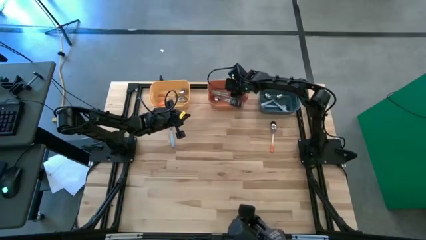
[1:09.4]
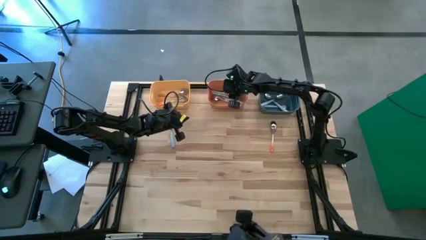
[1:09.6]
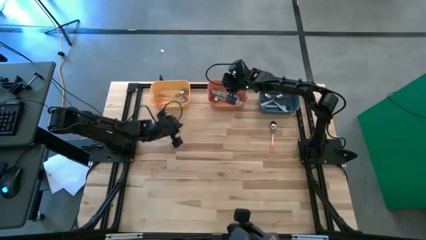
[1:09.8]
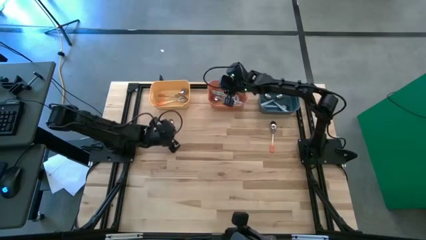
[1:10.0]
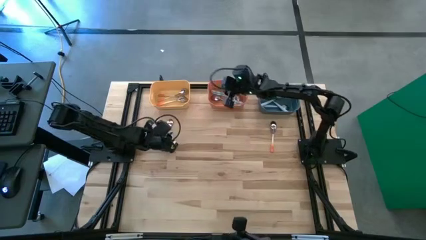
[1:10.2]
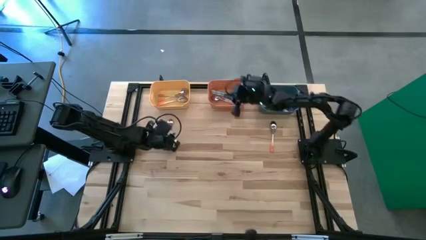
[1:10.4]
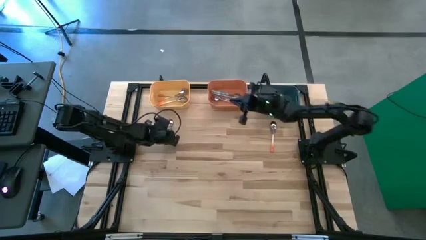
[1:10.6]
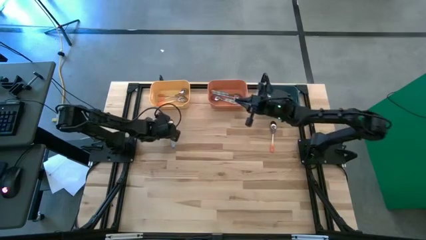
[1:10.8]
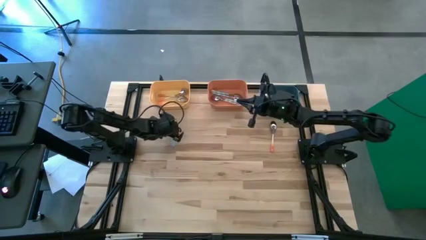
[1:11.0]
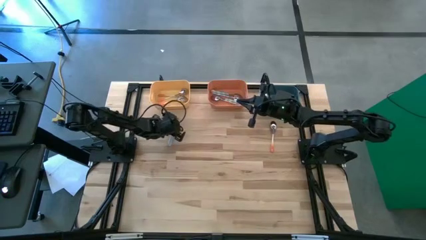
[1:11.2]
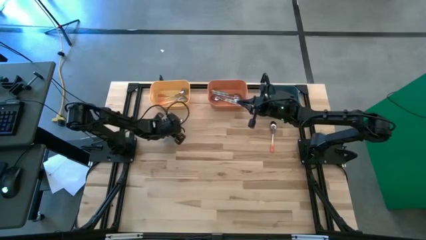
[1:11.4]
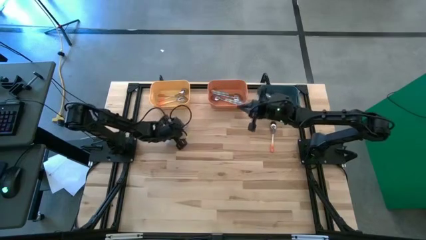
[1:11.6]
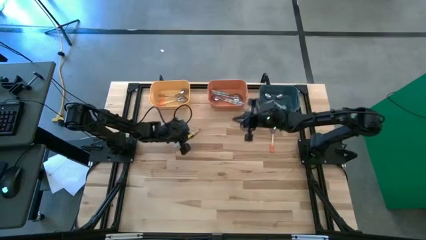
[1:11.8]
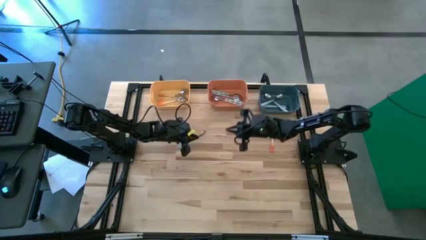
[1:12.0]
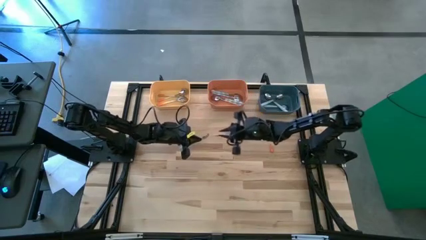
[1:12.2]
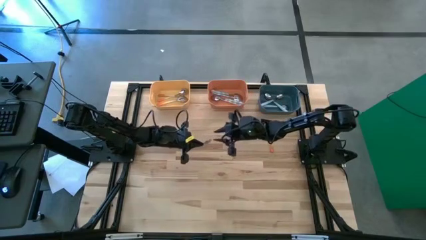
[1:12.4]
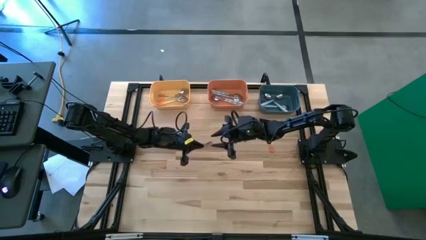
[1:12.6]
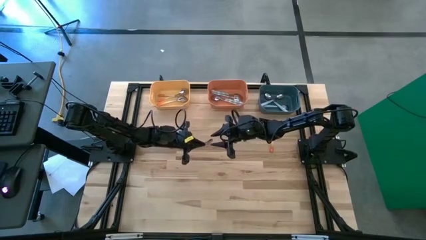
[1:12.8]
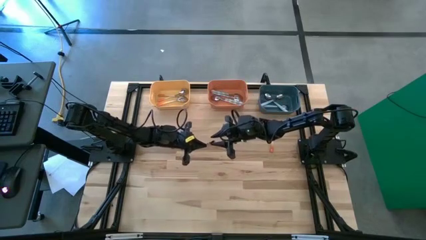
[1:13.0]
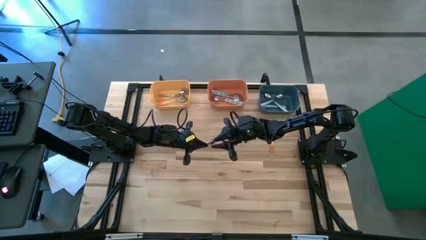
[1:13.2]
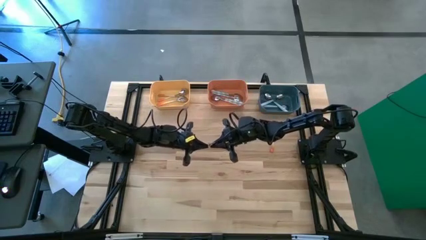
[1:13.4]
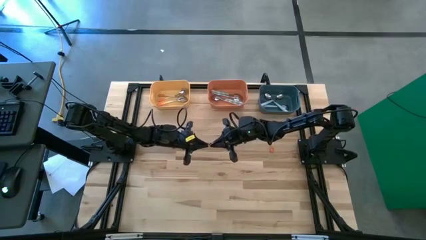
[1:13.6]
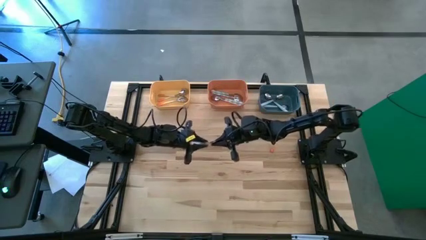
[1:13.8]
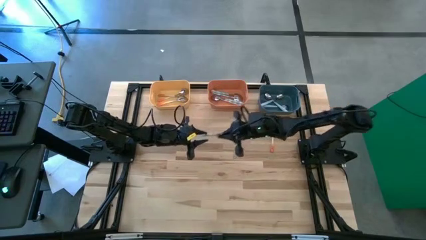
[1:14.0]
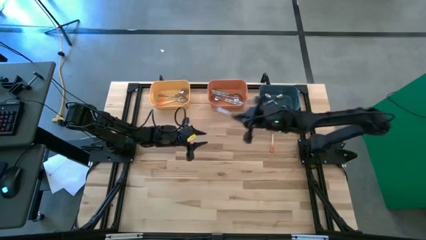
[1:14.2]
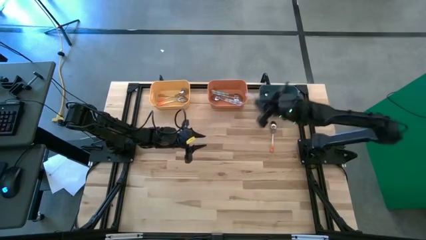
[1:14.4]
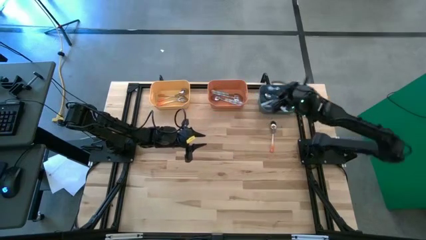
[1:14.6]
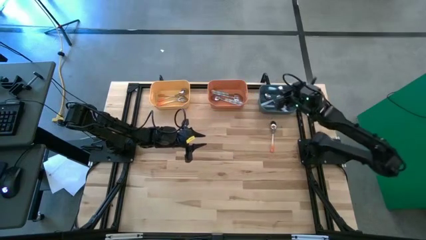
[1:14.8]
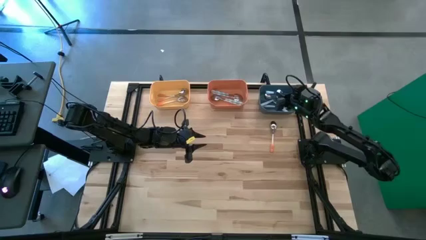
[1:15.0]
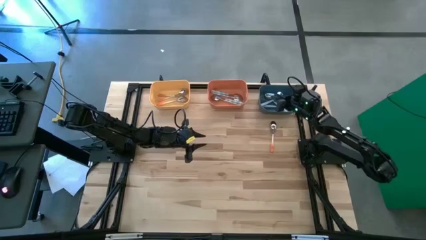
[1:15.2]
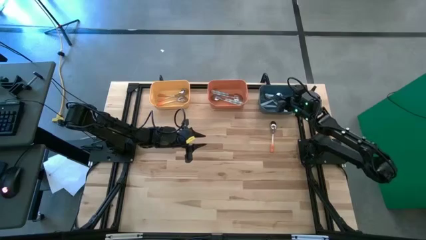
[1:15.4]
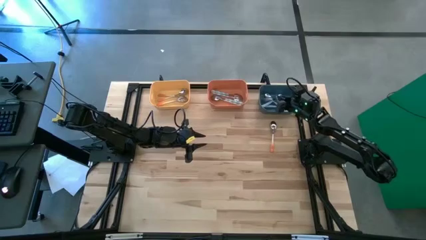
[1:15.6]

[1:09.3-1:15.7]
Task: Sort silverware by color (type)
Put the blue spoon into the blue bin

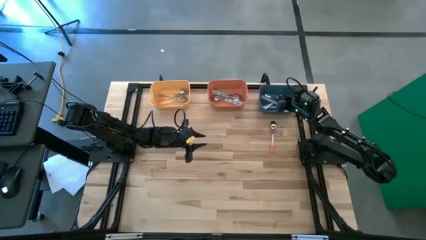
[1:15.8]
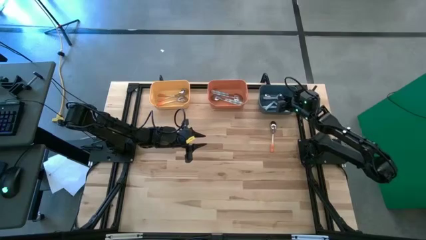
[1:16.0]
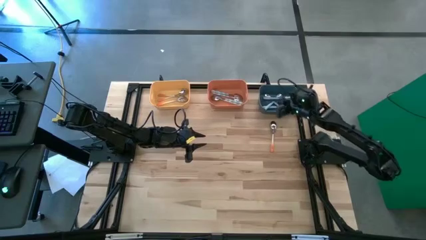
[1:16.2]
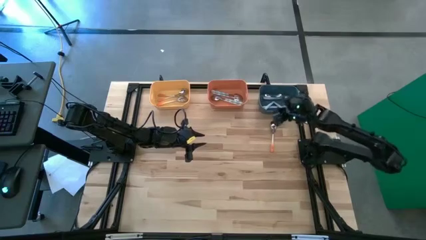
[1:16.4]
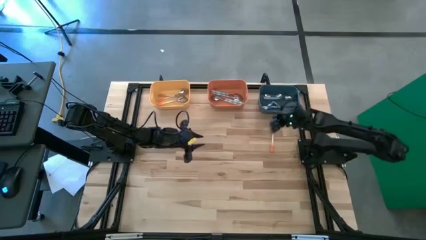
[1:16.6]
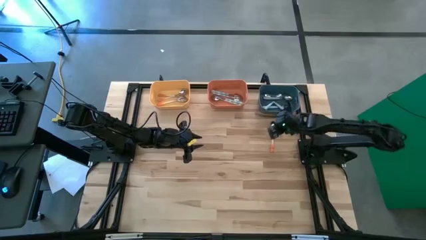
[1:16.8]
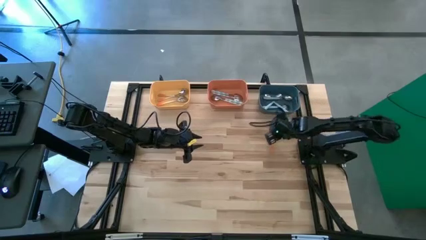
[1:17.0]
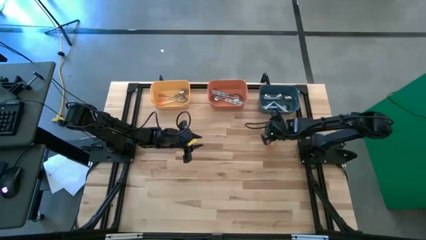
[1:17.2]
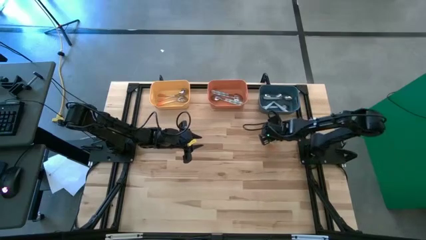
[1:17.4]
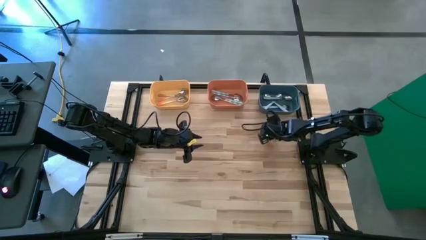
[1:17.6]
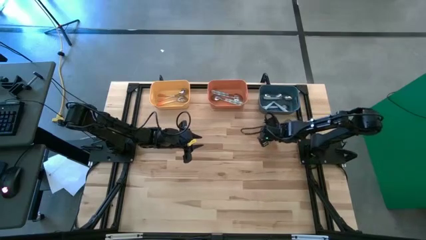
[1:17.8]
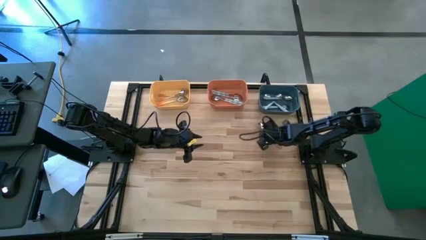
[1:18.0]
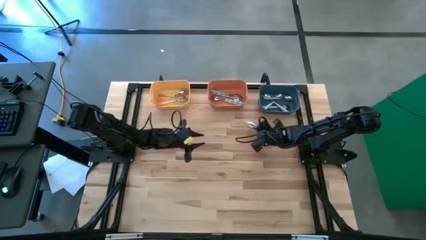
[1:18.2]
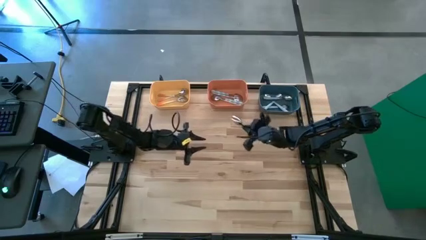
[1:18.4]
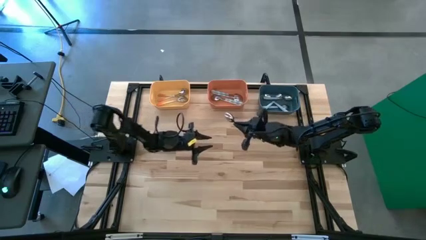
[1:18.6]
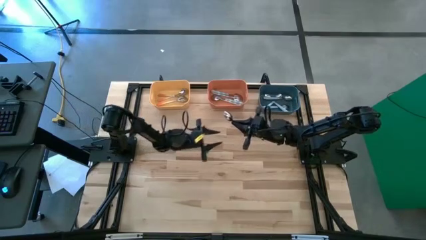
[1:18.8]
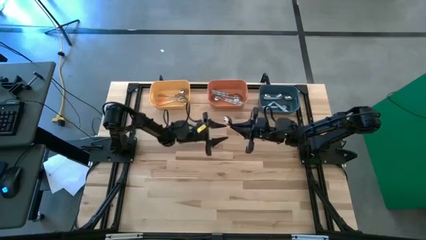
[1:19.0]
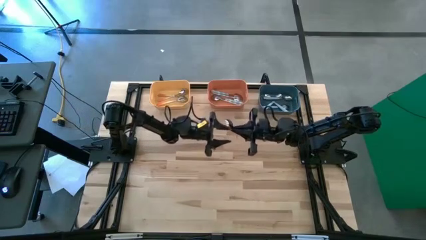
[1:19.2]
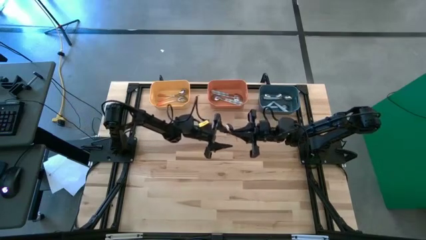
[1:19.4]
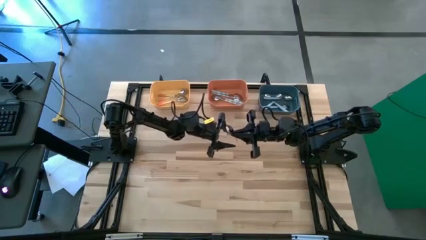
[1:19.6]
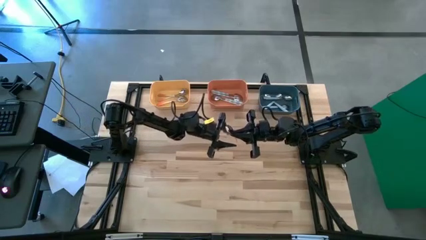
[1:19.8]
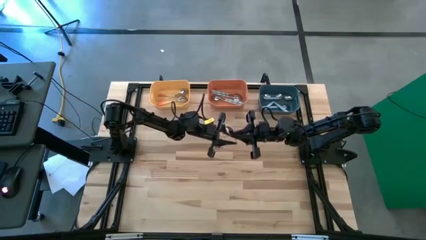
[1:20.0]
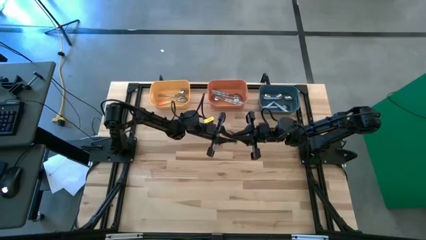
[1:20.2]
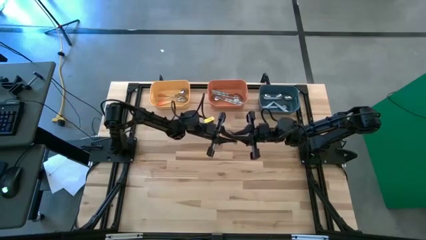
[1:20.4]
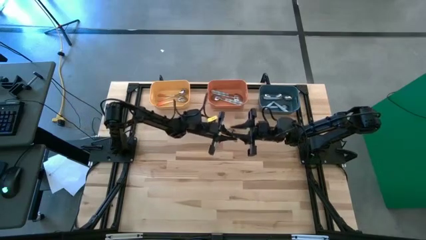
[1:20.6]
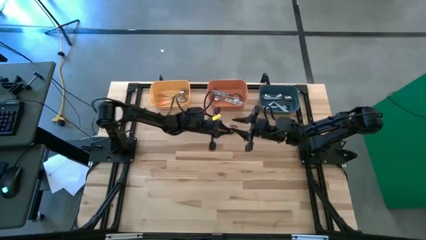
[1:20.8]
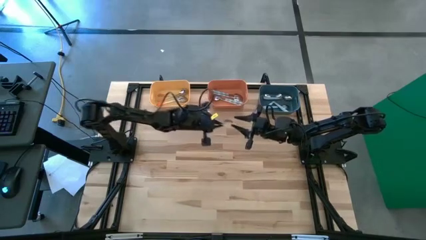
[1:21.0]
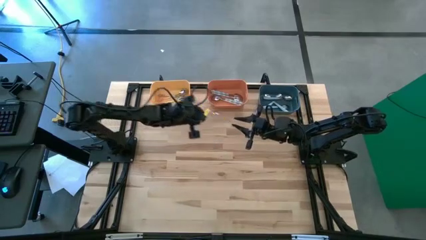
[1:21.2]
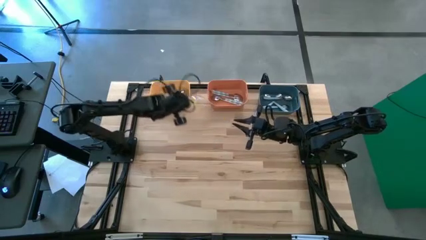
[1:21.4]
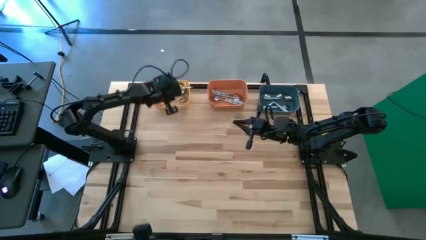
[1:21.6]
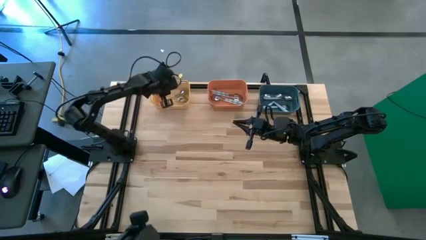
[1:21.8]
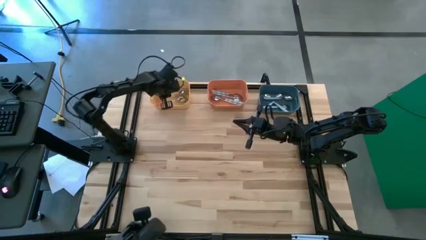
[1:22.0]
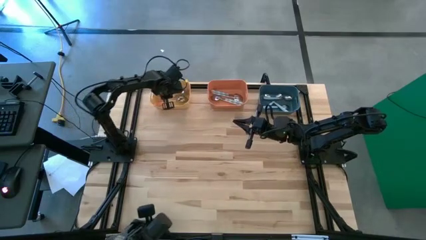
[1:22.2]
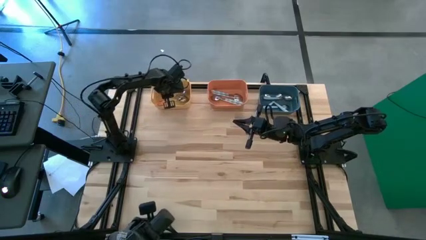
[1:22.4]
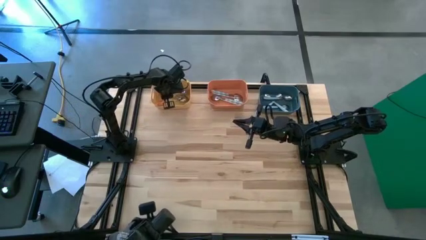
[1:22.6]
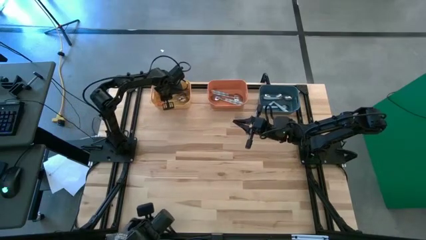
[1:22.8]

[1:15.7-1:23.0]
Put the orange spoon into yellow bin

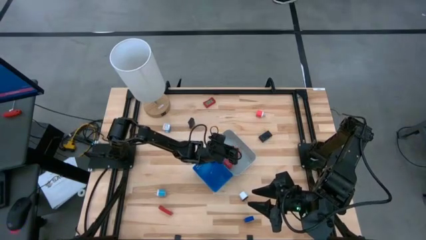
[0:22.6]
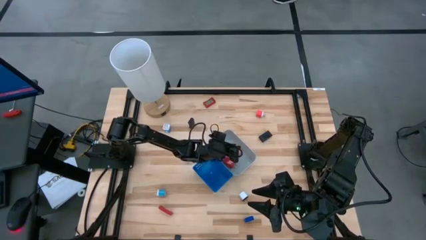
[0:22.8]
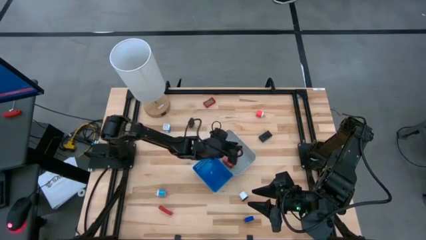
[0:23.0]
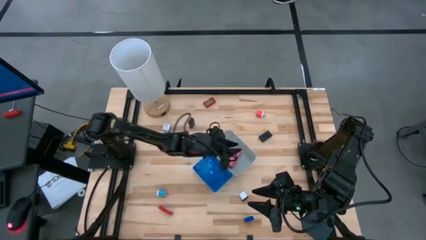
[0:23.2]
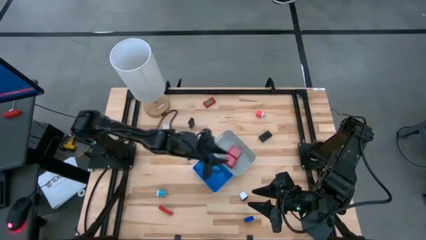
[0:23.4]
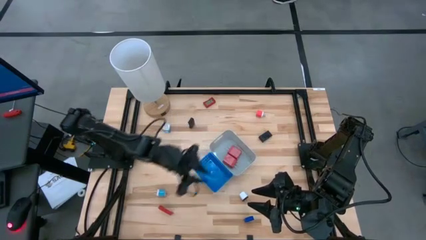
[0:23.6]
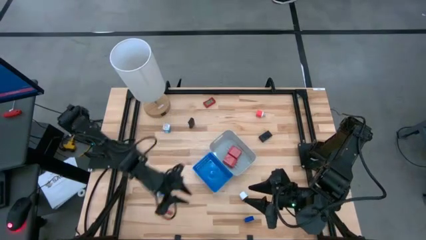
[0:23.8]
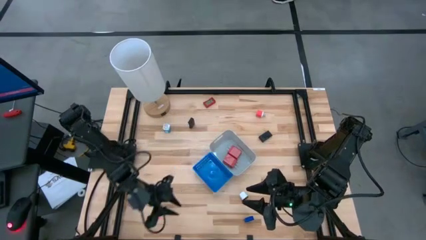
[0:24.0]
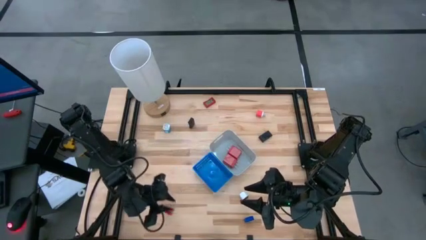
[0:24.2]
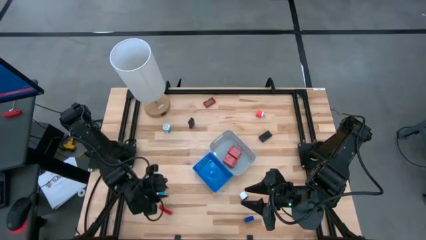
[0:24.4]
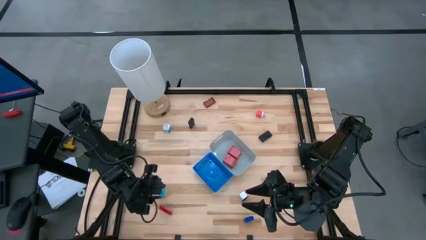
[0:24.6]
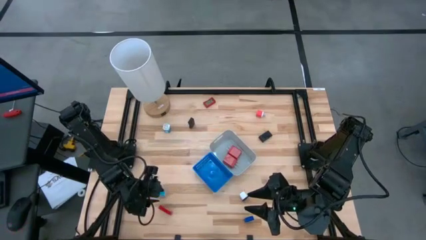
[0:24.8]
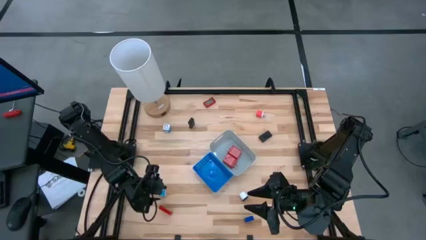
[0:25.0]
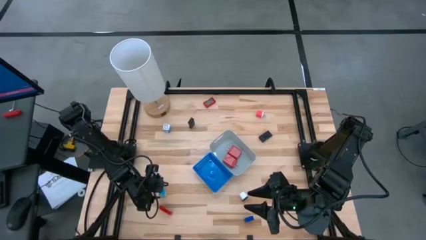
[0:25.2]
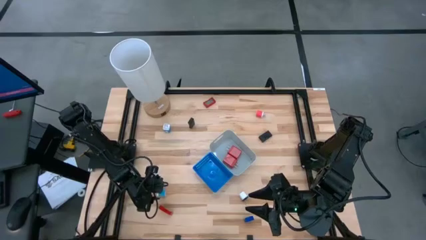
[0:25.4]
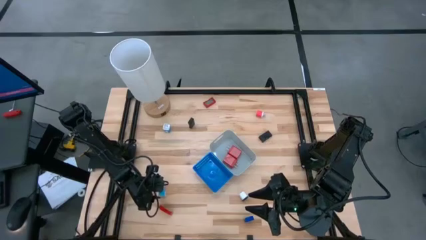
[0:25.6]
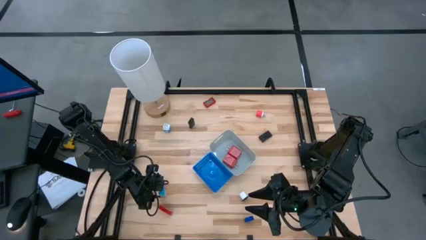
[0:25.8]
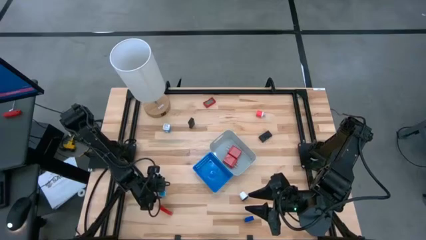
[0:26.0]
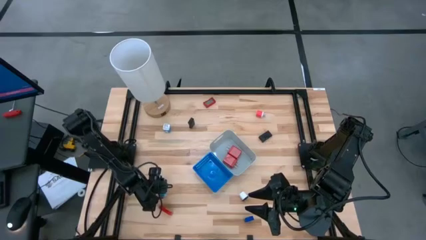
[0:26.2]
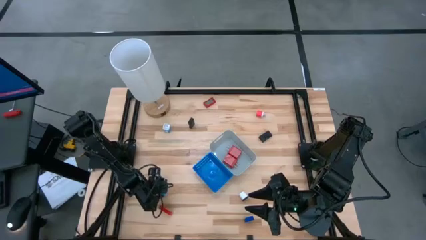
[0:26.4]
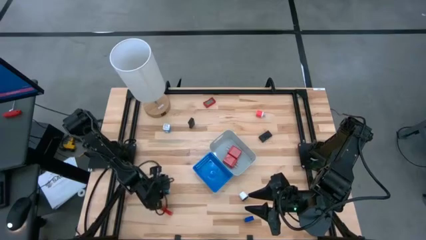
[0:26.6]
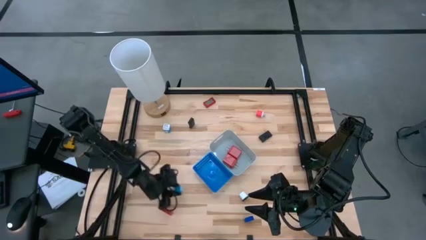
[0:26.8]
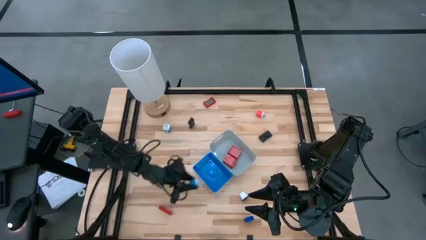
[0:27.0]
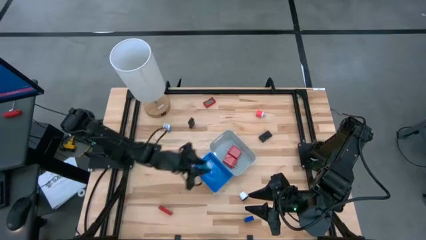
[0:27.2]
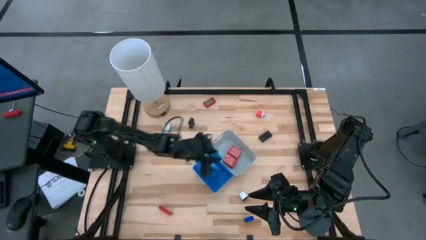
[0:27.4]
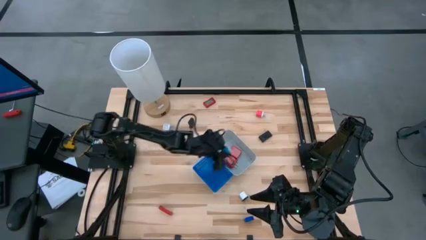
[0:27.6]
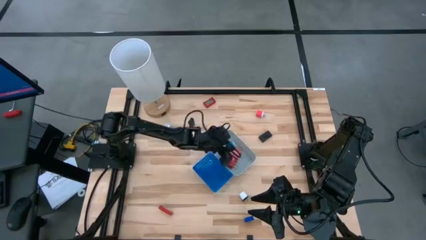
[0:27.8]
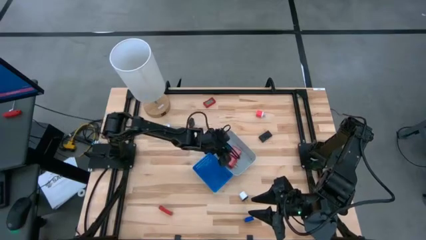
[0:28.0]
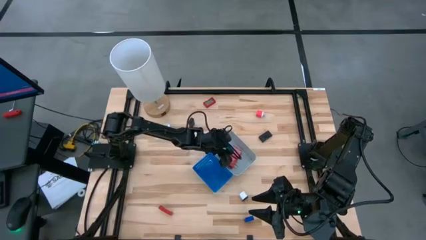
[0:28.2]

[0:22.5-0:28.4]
Task: Pick & Place Office items
Put the bottom blue charger adapter into the gray bin
